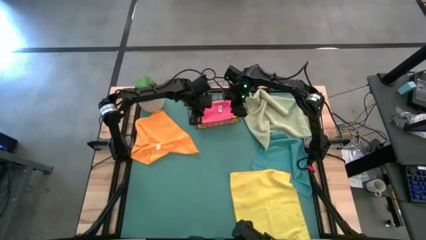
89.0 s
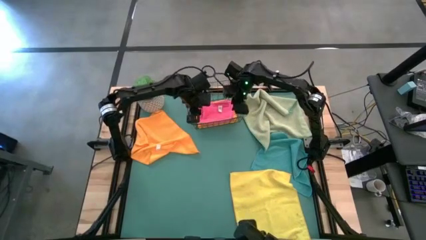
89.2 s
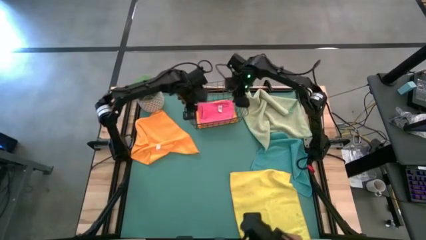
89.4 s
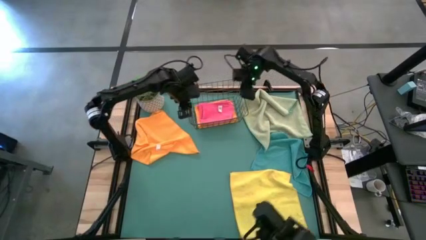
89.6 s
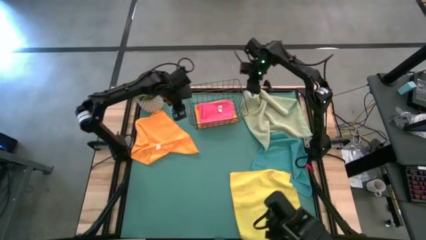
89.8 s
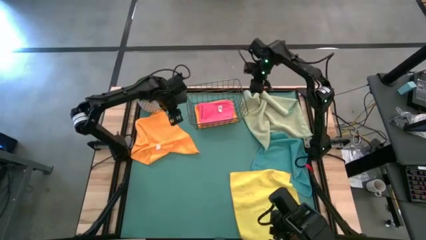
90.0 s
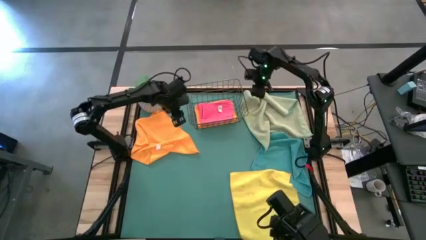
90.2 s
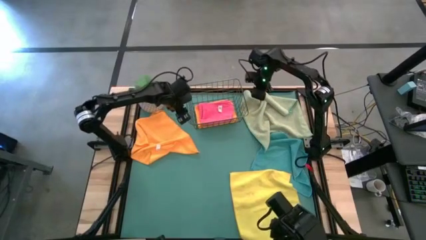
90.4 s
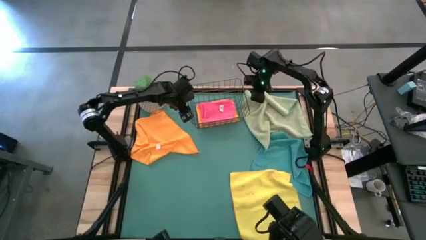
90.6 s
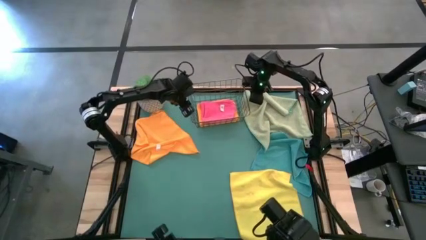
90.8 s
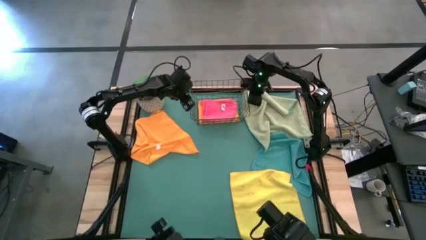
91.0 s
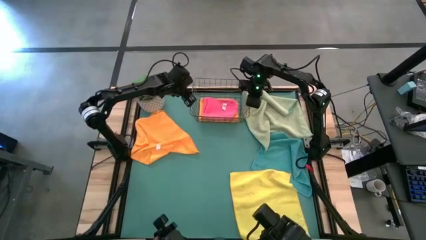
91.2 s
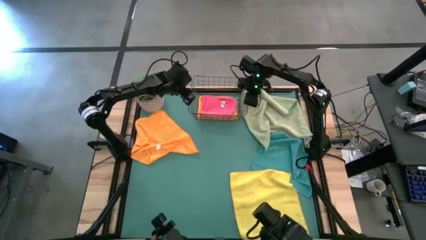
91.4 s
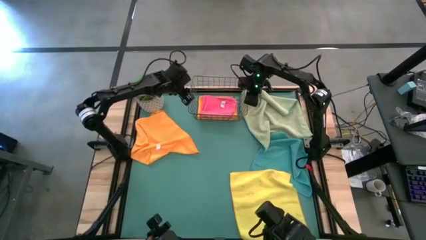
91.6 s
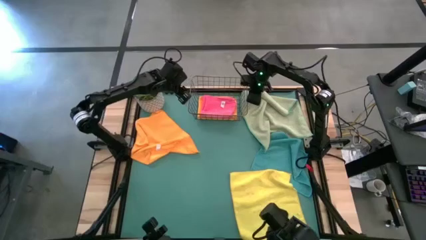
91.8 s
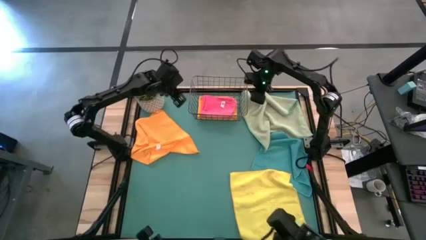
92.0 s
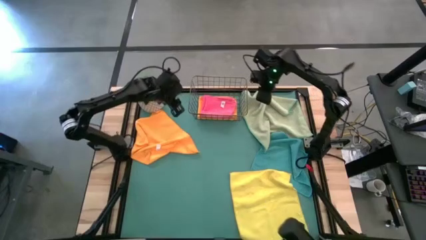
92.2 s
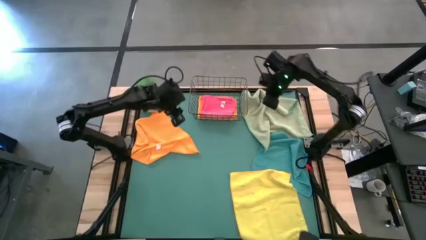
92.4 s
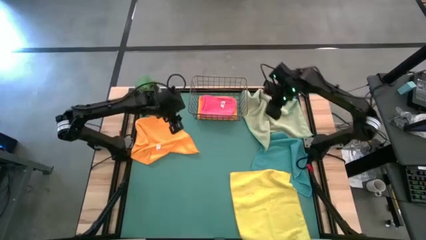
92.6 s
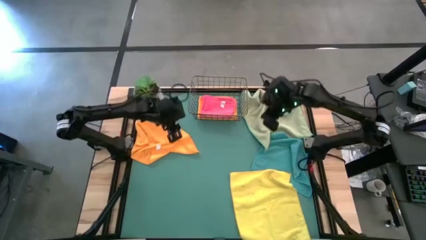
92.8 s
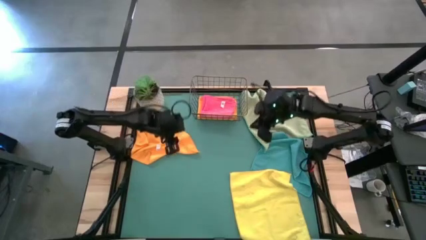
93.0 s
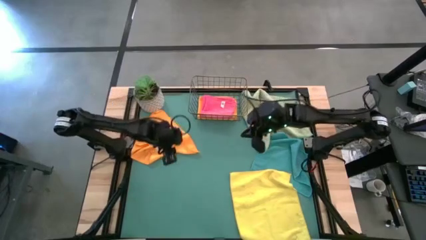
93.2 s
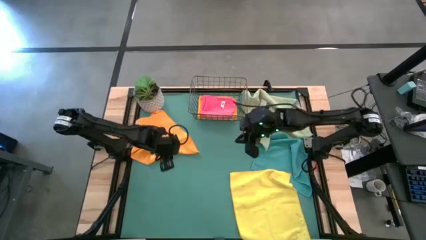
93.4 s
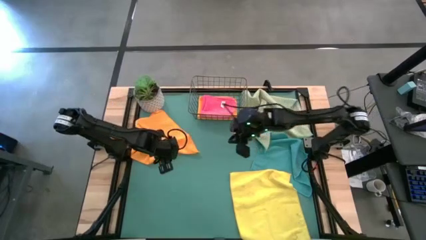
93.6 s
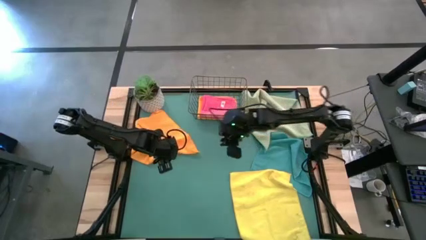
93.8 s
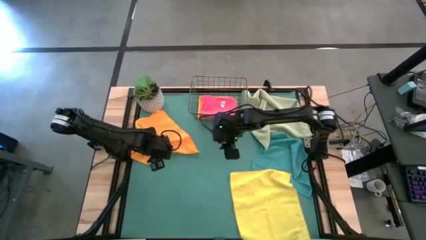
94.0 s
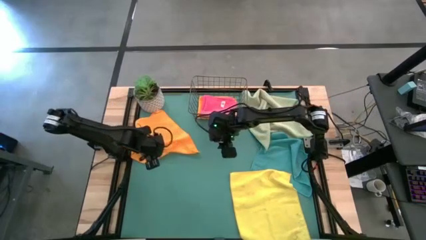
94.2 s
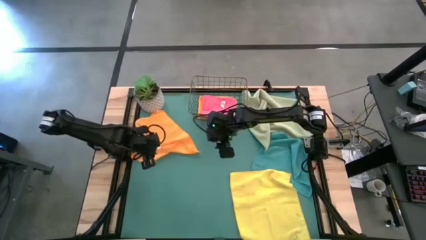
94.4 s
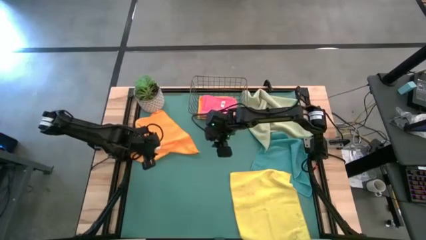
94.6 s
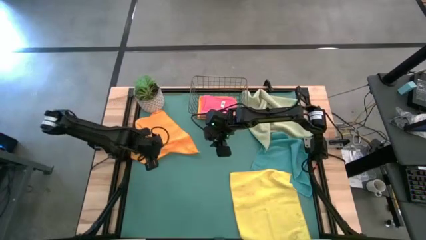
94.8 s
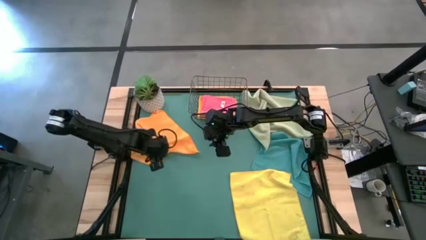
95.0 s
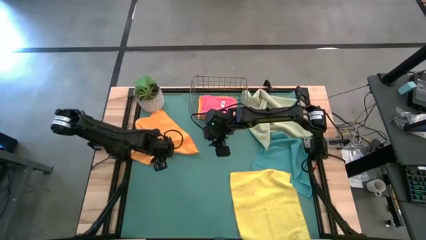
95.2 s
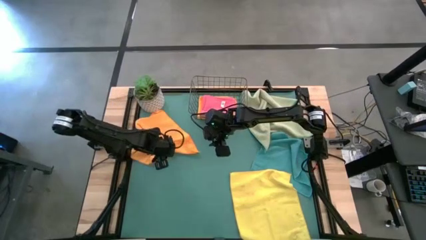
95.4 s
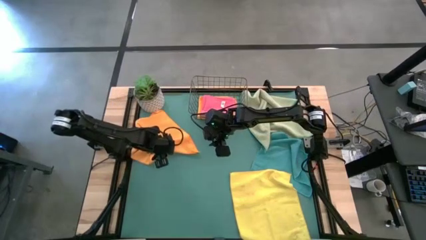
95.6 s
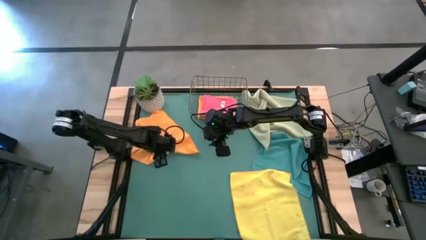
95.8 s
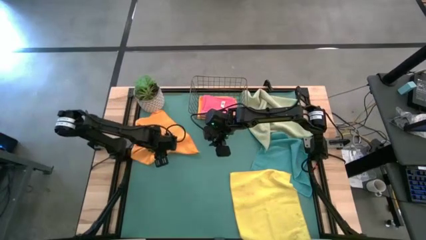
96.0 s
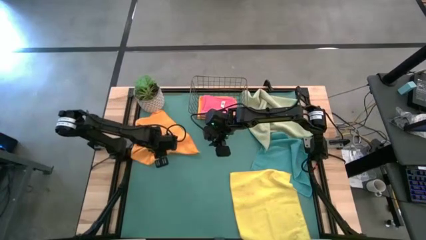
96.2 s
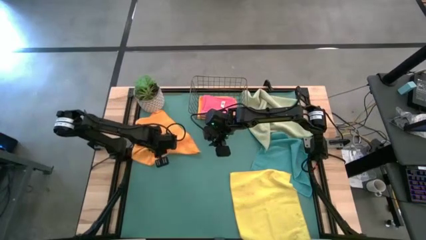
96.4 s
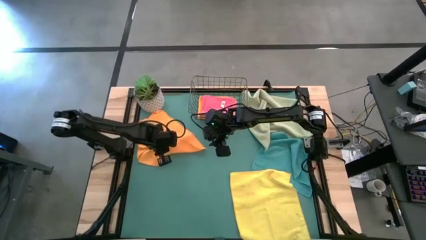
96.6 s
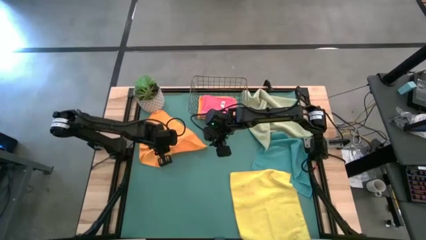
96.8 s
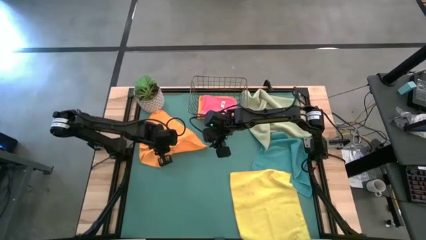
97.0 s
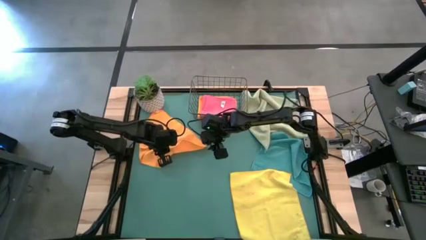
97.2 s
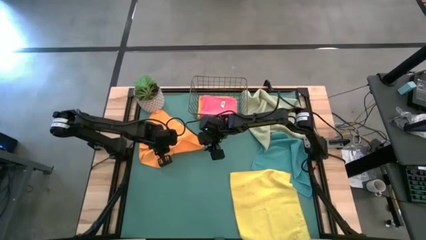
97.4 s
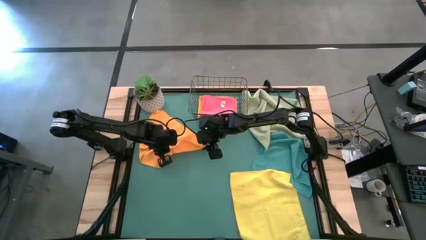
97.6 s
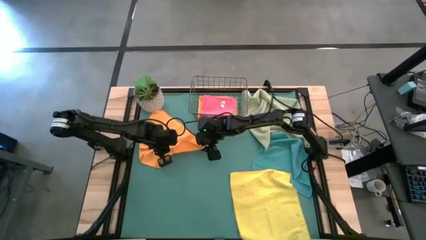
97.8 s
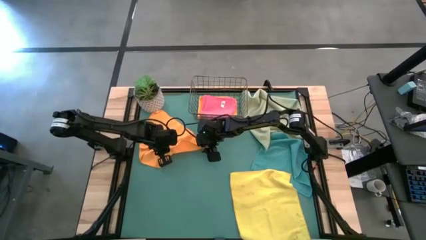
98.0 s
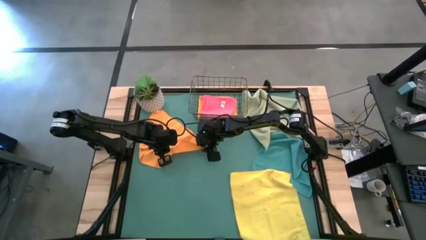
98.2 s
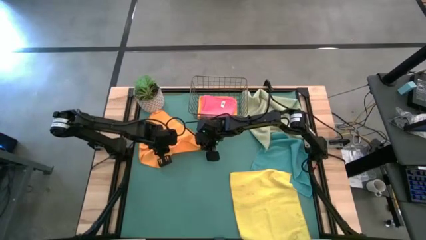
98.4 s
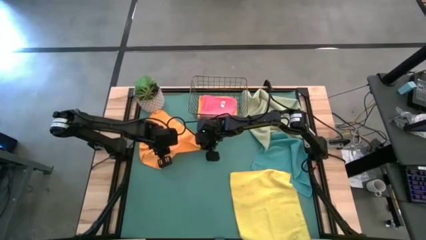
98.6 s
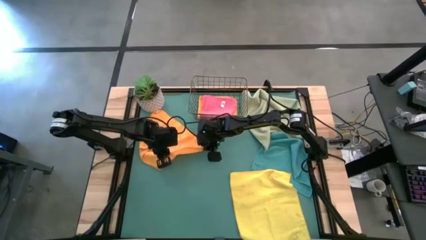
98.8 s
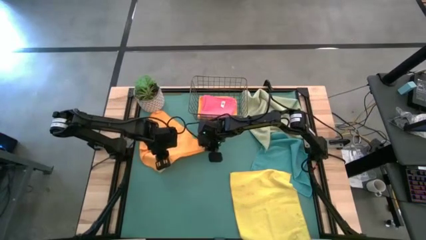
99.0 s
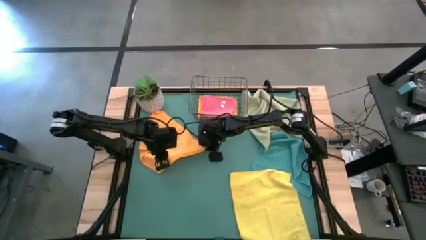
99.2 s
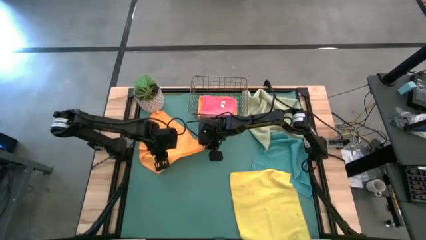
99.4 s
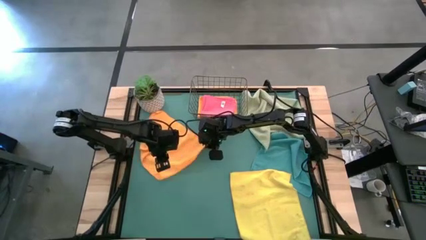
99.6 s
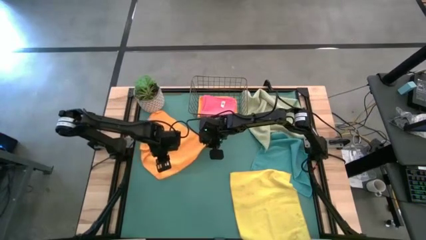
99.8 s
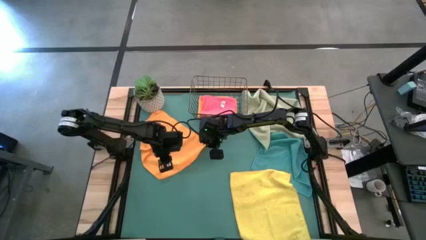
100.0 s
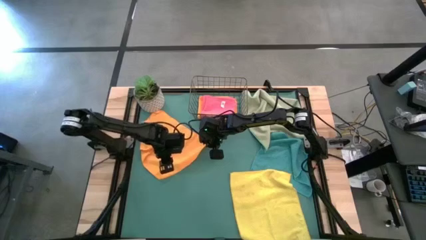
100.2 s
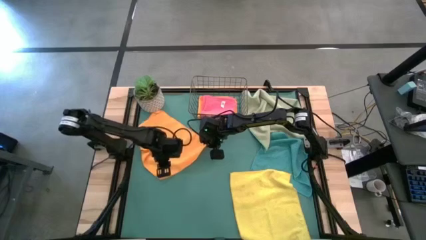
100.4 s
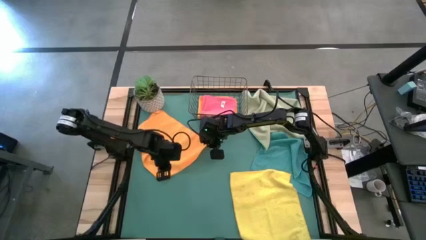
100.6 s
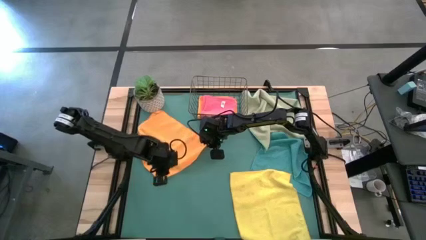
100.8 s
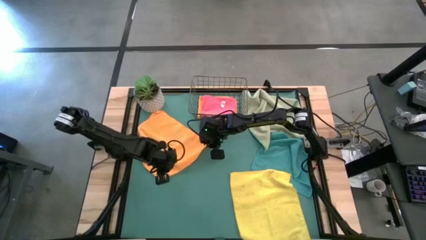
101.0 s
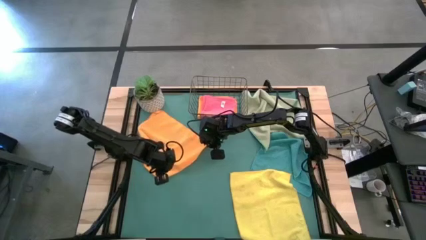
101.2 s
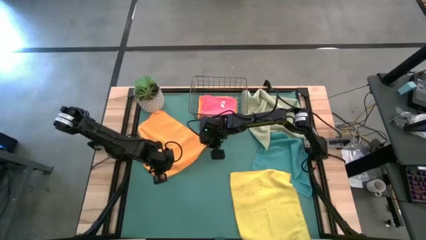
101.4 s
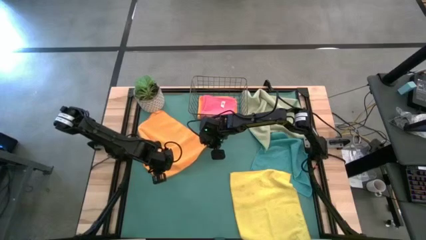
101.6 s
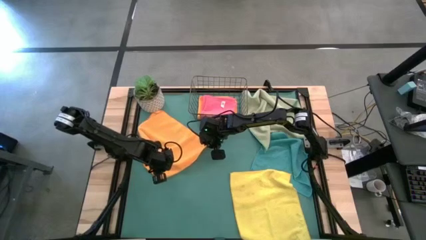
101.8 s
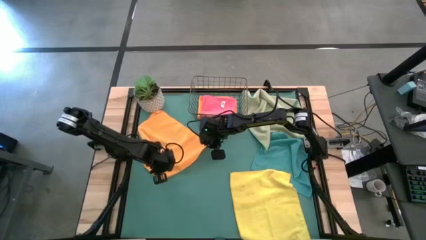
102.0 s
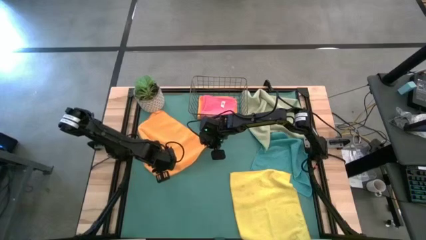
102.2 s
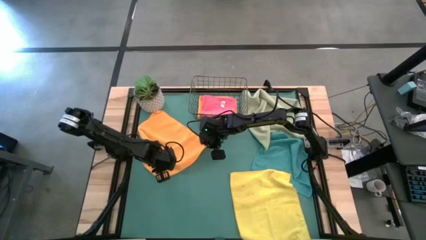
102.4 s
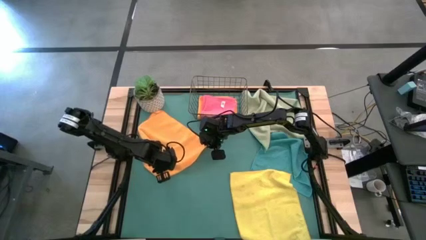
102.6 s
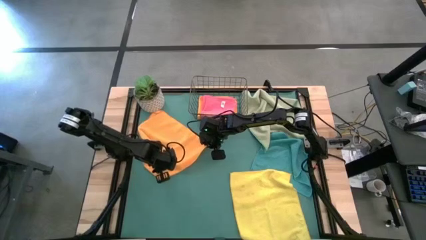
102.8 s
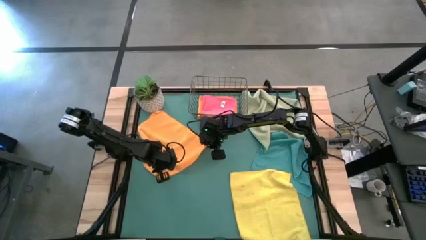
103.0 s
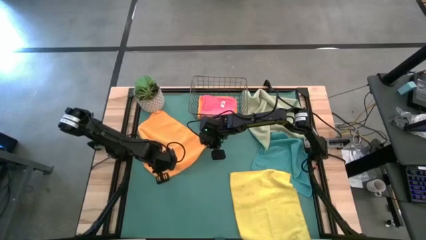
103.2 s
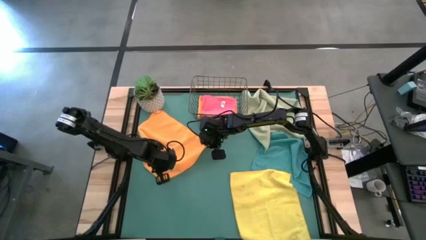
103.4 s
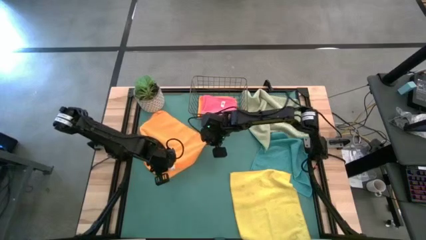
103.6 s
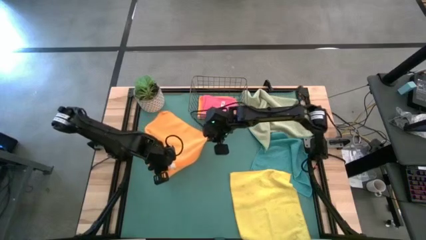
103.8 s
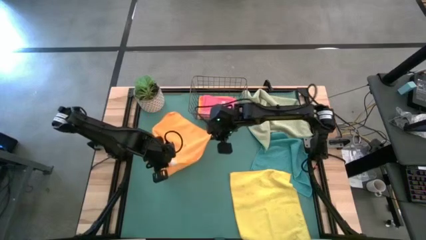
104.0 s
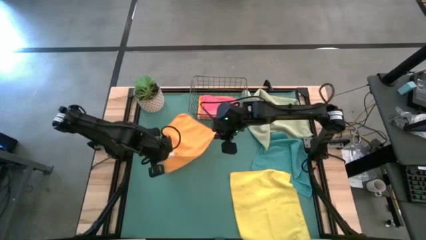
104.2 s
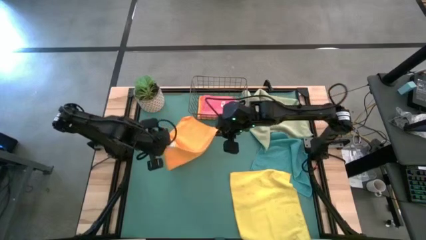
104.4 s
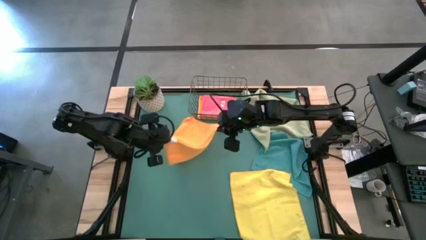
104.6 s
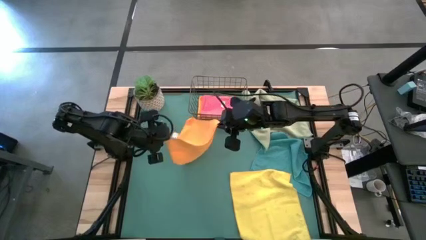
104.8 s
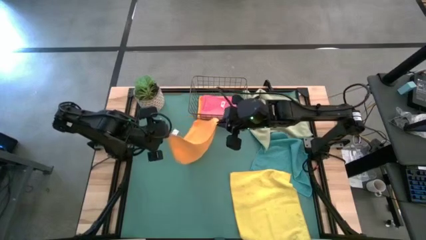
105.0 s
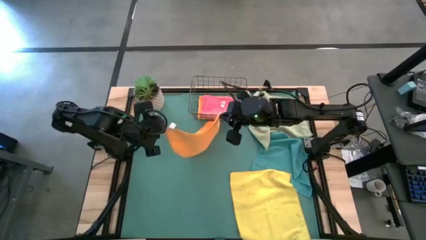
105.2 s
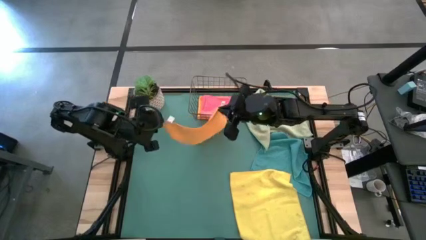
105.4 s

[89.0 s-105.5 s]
Task: Fold microfiber towels
Fold the orange microfiber towel
